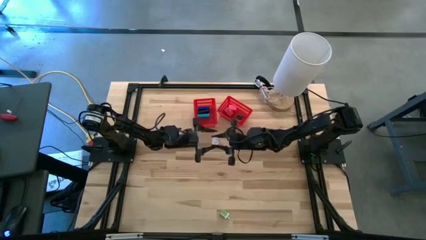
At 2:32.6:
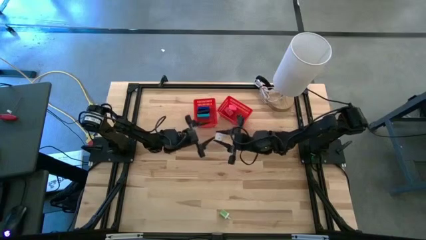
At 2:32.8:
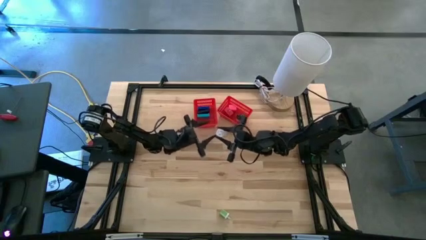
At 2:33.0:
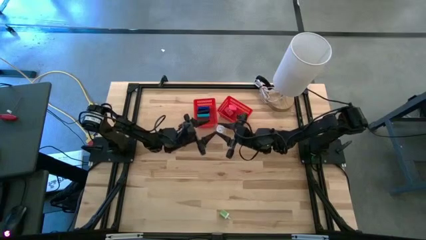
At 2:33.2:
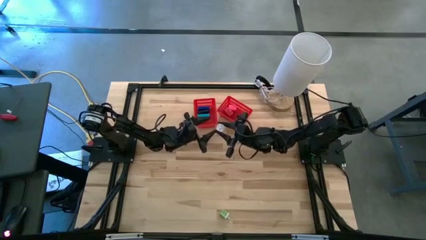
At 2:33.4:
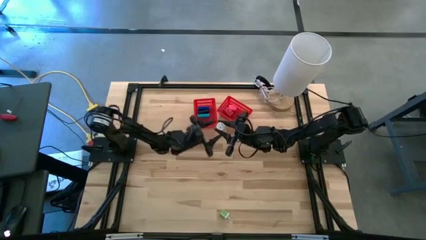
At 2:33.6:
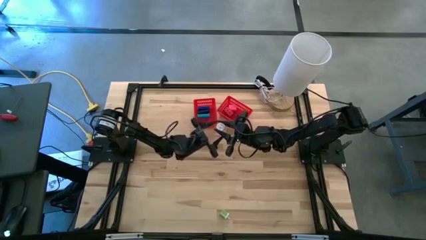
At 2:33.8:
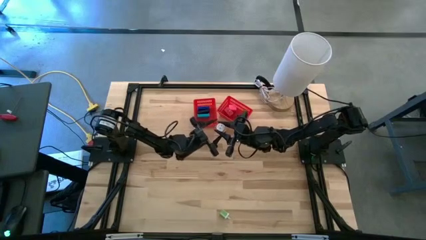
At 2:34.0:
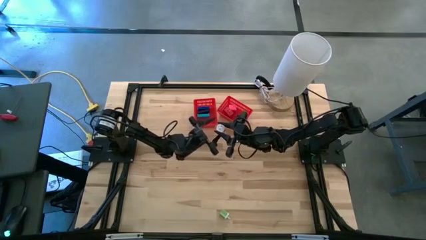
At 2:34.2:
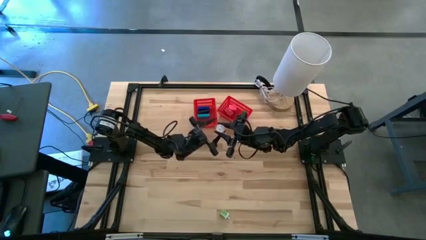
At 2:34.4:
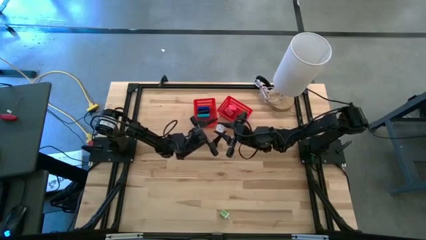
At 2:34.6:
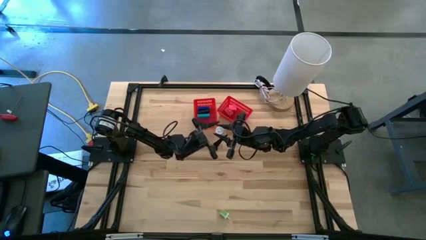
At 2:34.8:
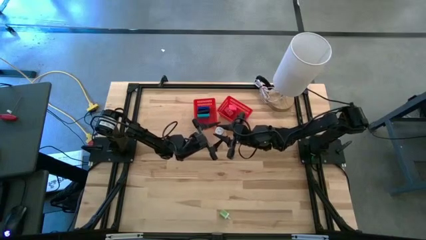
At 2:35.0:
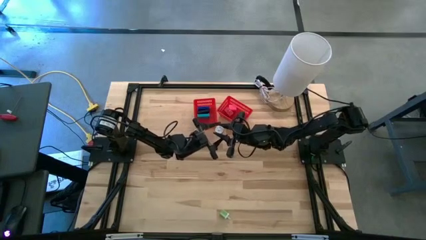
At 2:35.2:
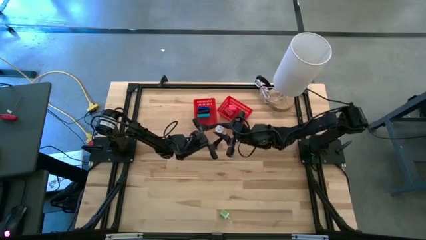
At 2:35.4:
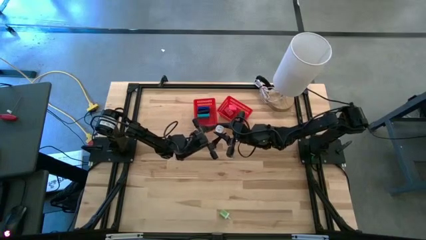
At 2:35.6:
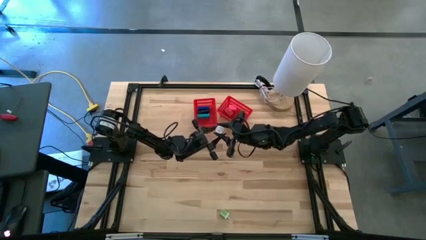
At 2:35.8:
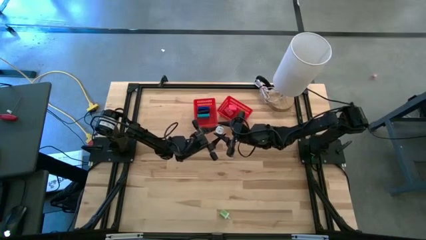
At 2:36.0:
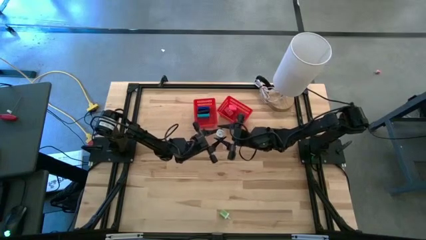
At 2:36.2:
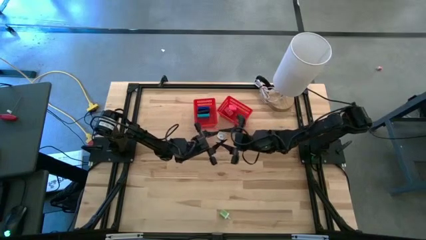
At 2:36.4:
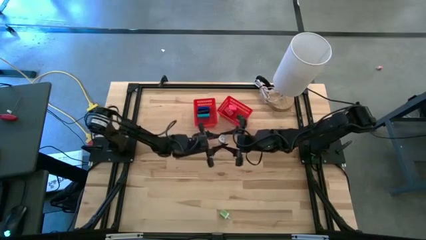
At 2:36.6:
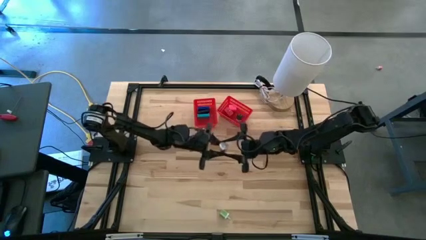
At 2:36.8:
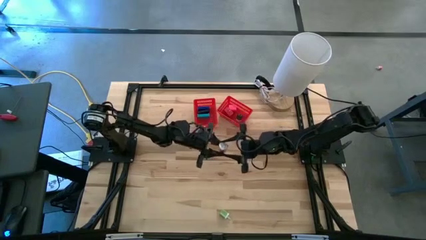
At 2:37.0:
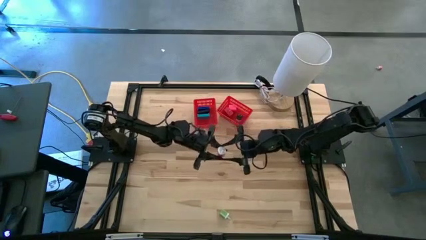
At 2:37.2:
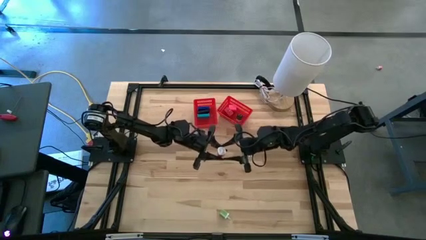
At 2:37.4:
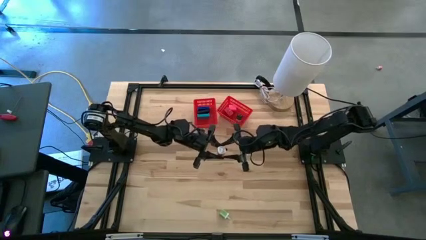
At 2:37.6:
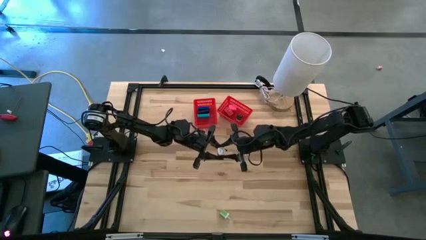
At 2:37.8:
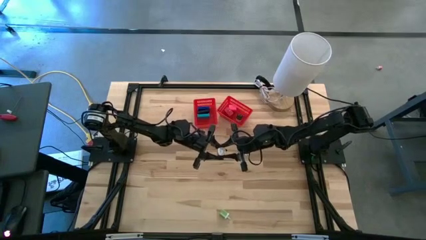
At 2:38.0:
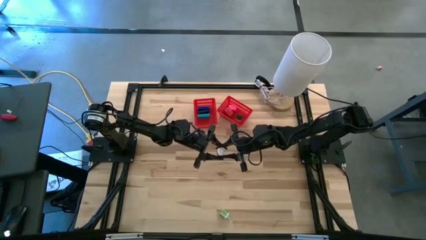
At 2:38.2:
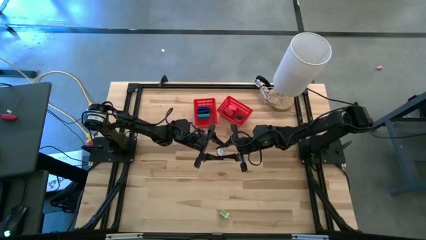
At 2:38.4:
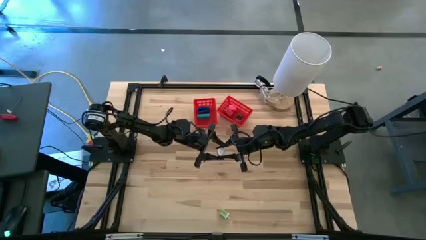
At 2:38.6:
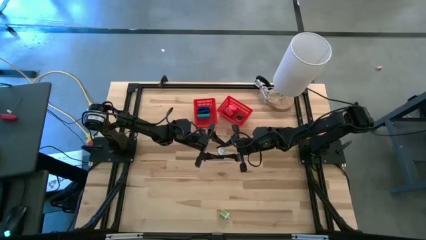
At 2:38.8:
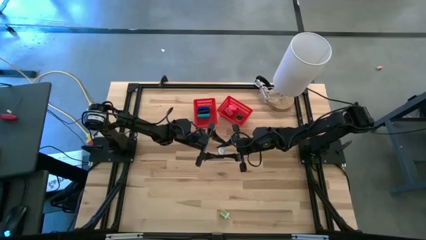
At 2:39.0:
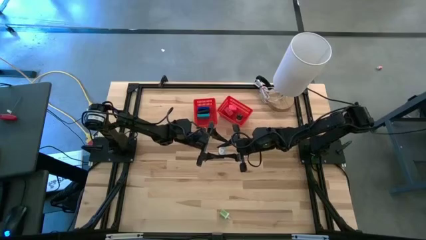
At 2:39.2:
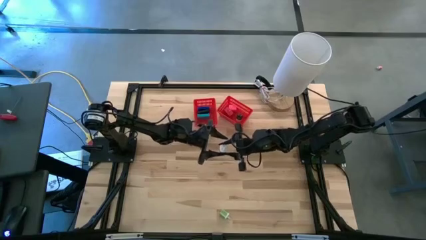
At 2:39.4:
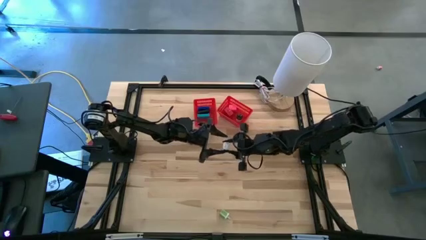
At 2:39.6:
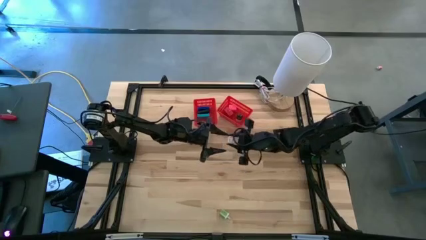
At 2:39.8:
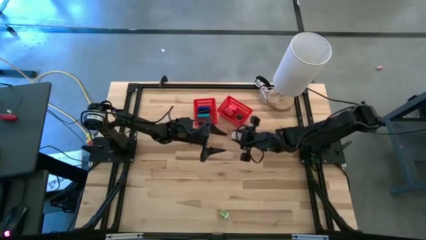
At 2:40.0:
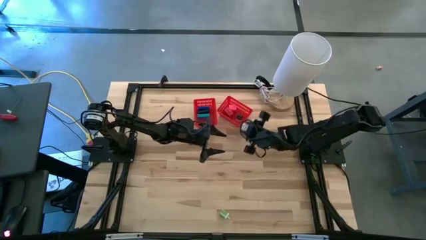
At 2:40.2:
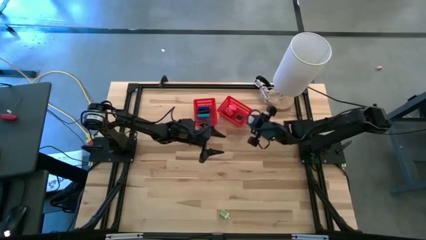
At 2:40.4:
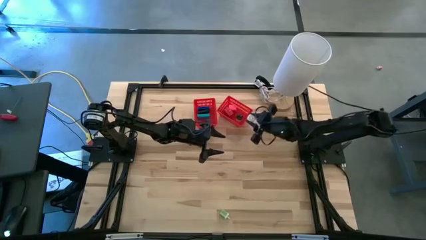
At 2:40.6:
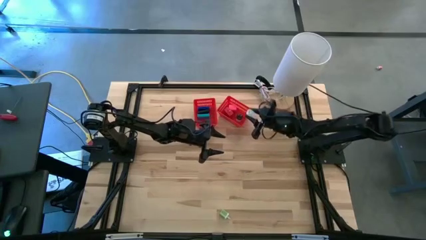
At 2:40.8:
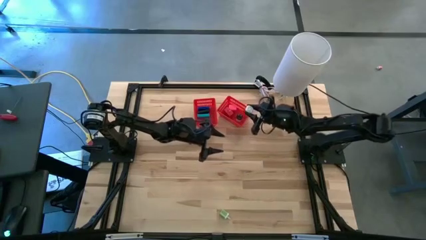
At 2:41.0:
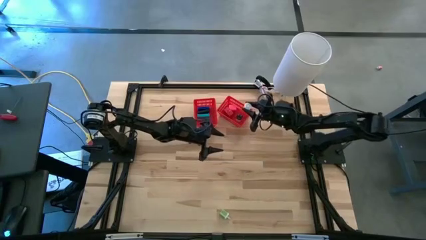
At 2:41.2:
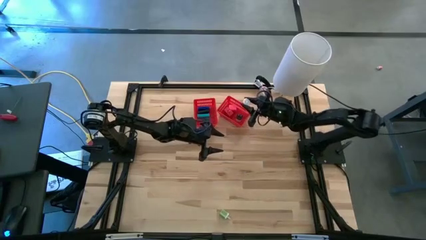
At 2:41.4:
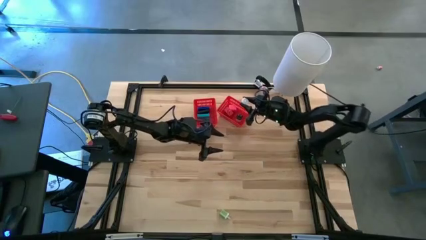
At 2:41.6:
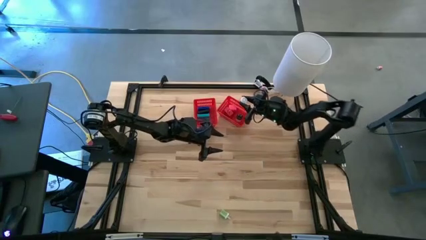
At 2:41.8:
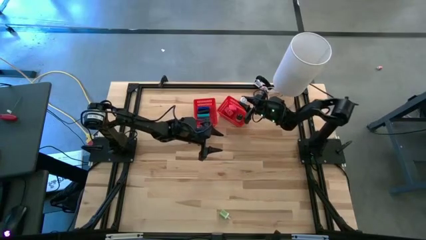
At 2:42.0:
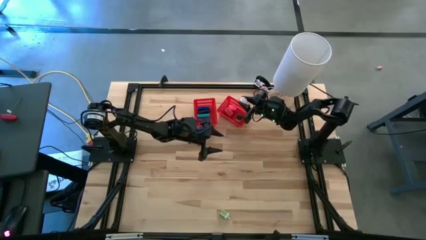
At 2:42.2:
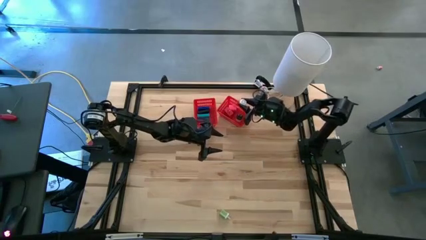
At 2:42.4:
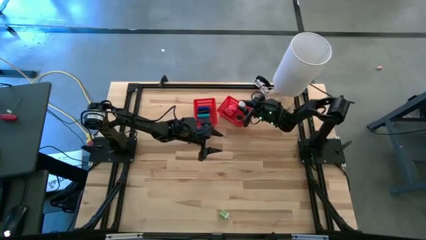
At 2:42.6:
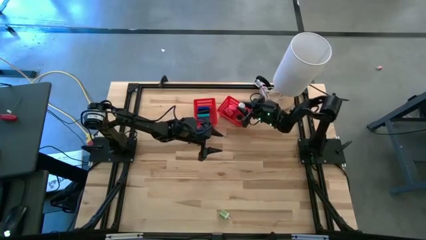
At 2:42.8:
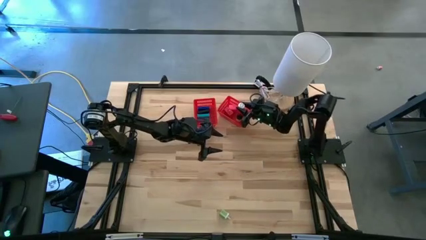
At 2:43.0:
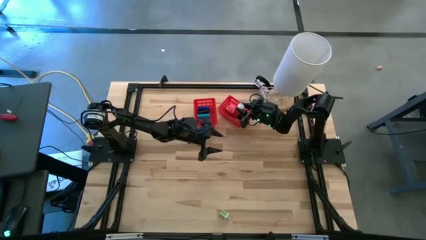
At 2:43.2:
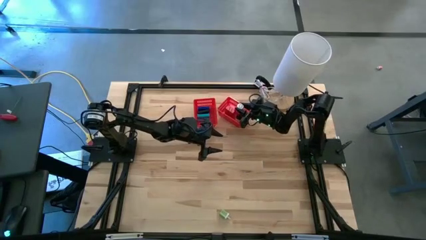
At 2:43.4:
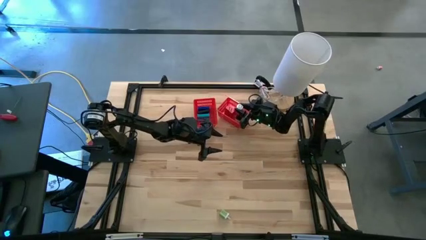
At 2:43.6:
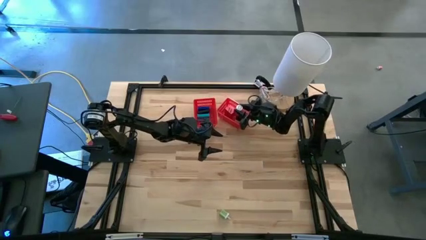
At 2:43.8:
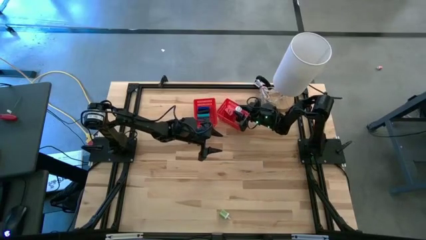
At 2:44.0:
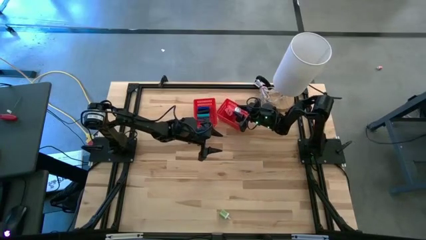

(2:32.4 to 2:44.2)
Task: Pick & Place Office items
Put the pink and white charger adapter into the right red bin
